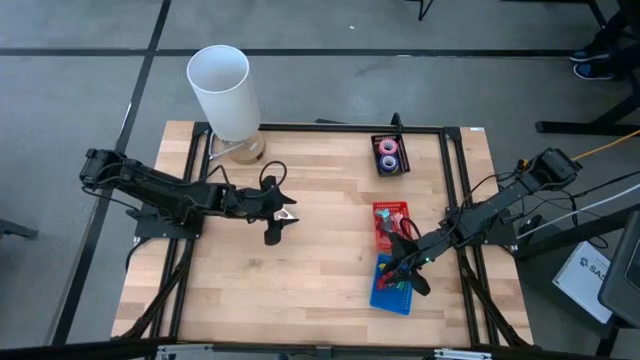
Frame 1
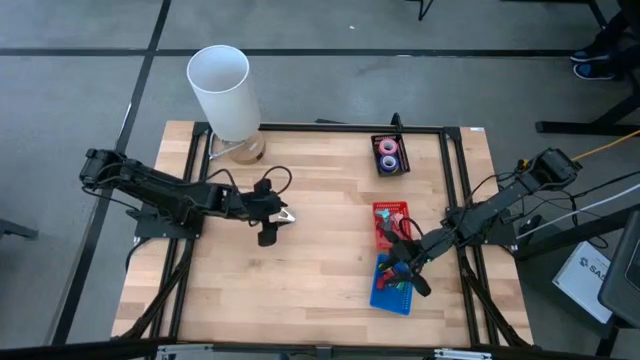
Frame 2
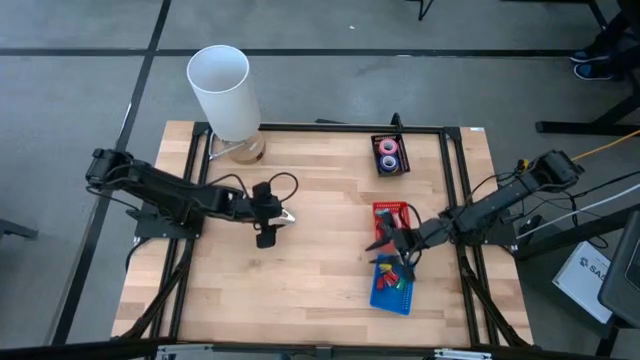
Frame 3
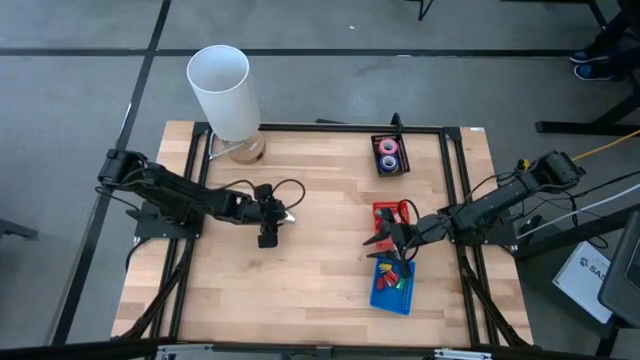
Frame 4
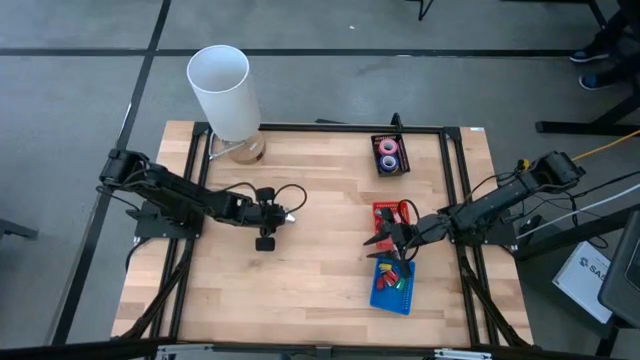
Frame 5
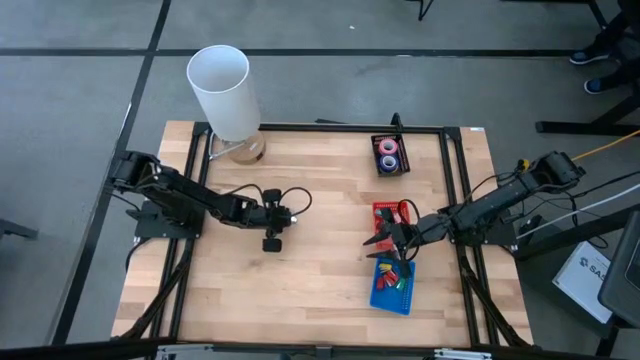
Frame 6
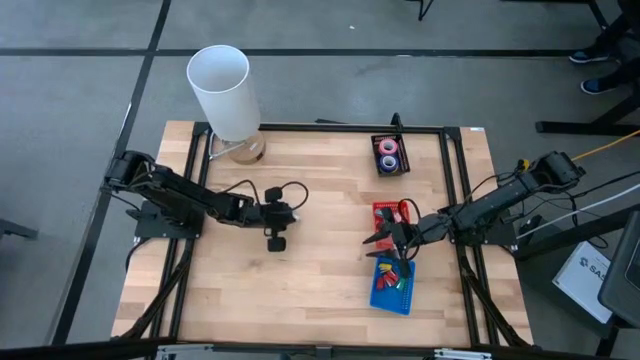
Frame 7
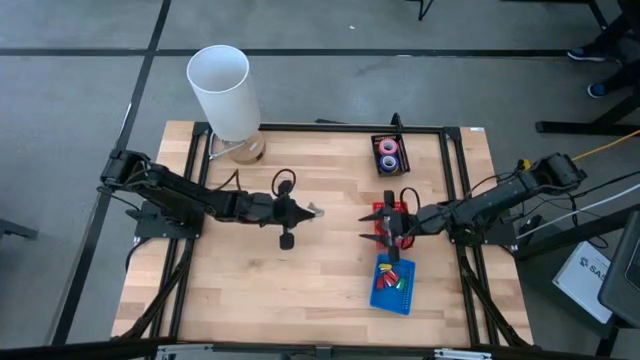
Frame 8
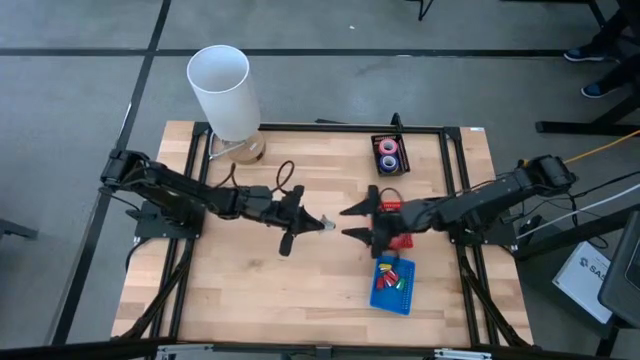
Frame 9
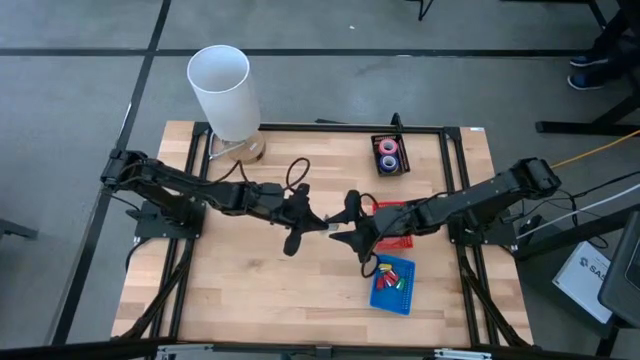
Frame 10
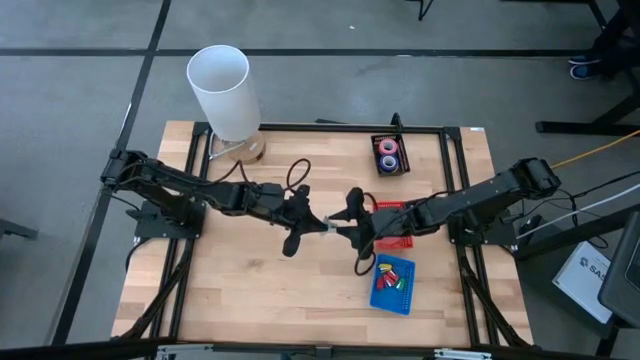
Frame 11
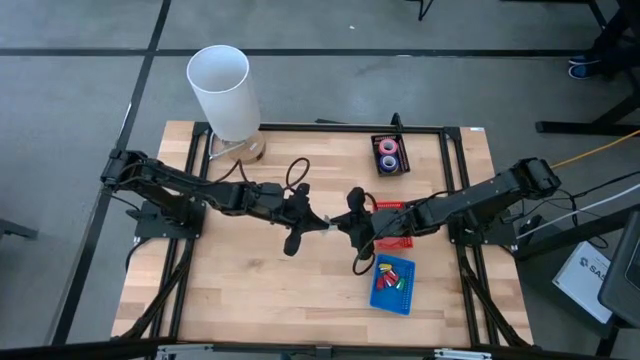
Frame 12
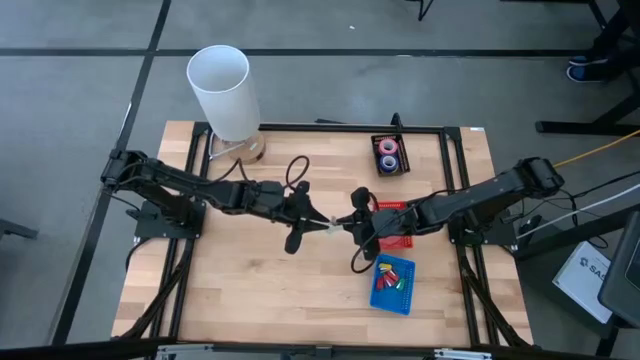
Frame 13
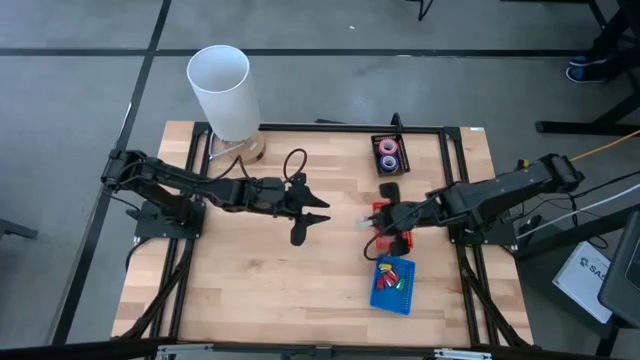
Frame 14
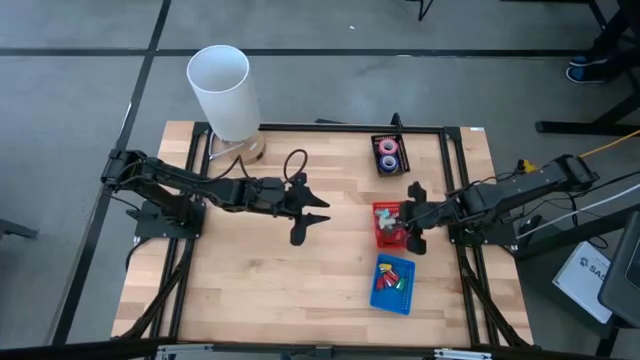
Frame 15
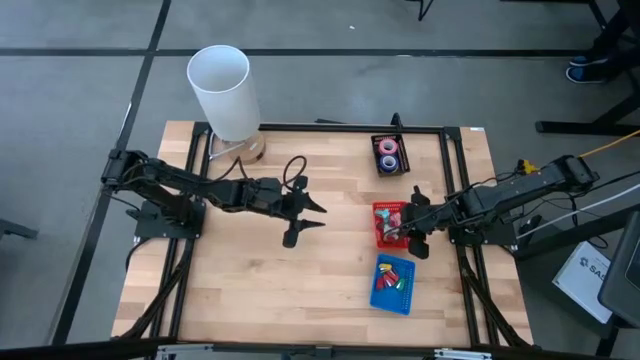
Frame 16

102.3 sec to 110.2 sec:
Task: Pick and place Stapler, Stapler remover, tape
Put the white staple remover into the red basket

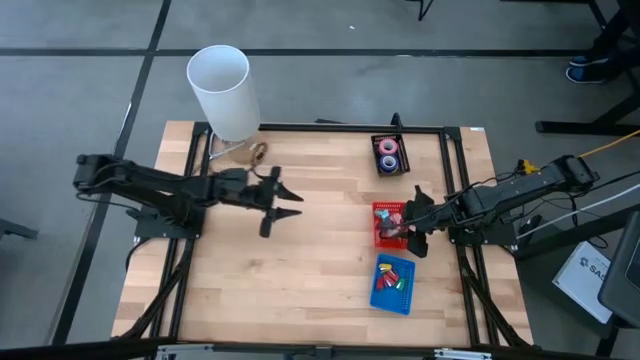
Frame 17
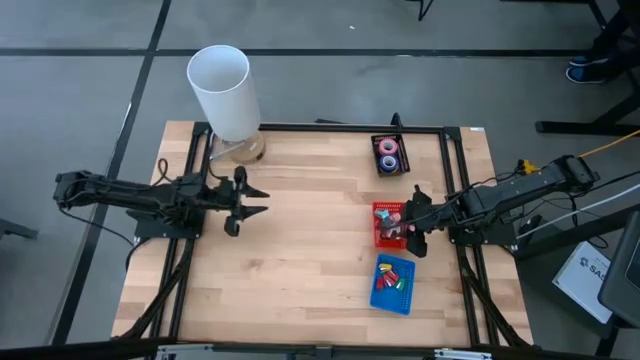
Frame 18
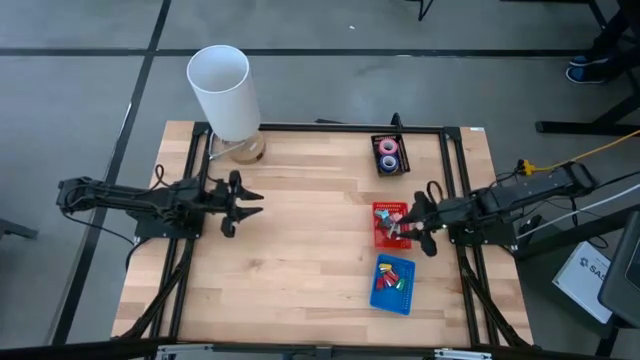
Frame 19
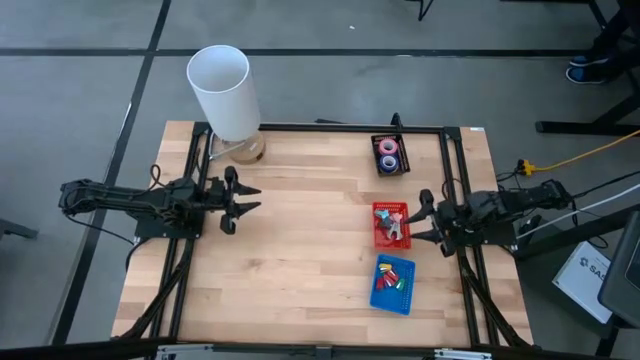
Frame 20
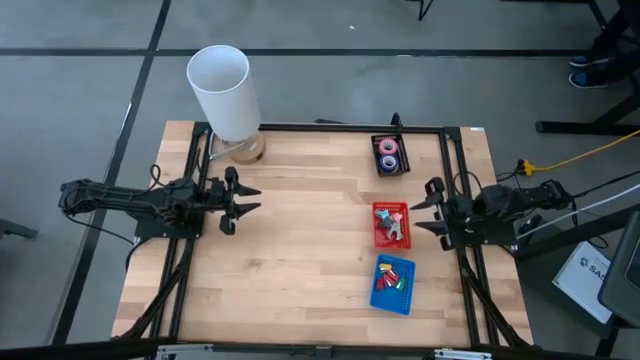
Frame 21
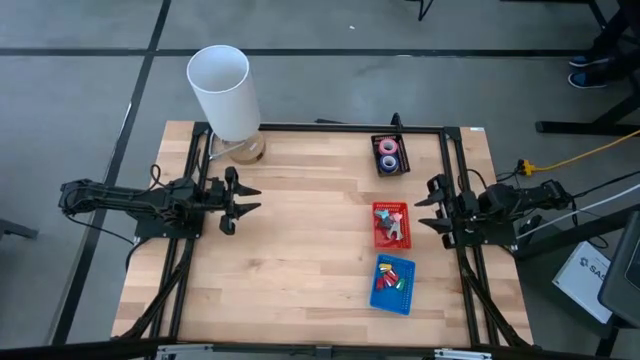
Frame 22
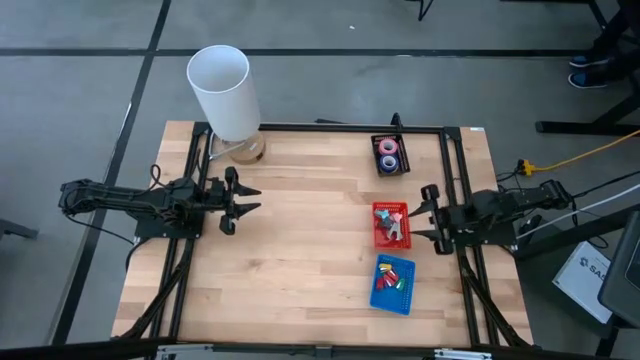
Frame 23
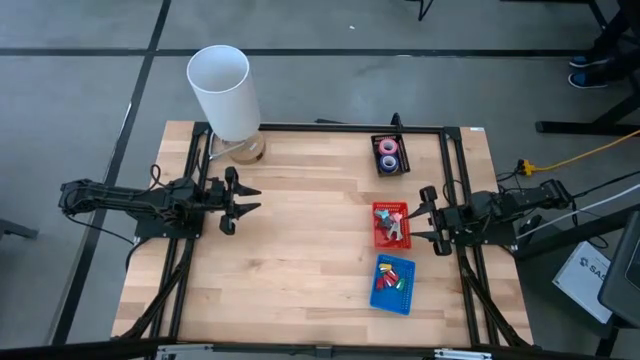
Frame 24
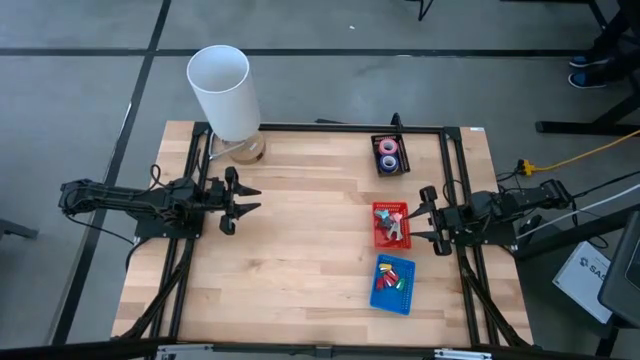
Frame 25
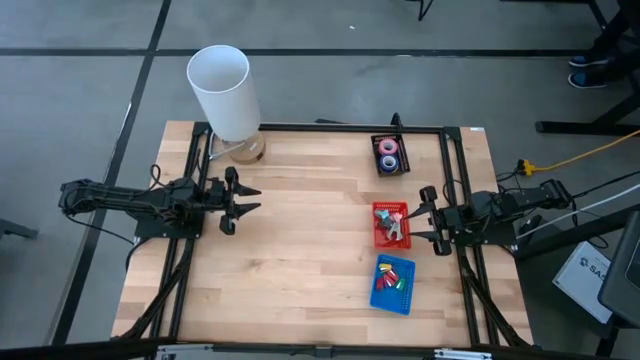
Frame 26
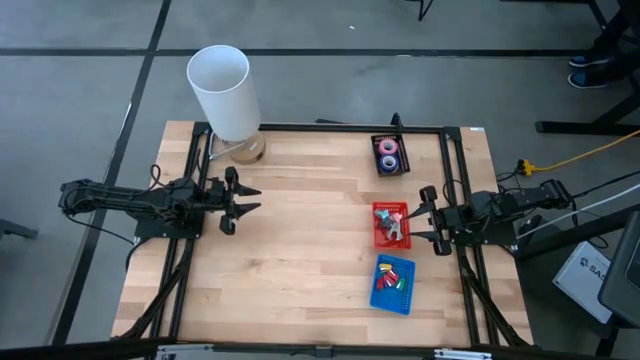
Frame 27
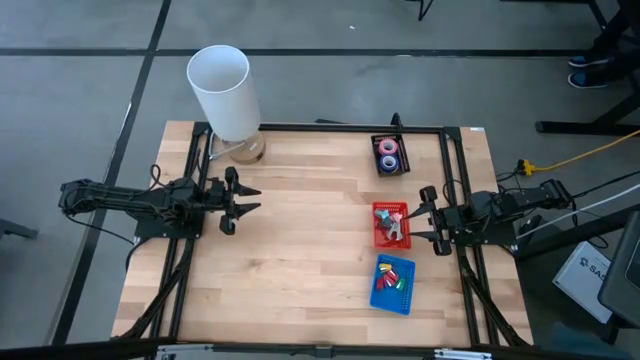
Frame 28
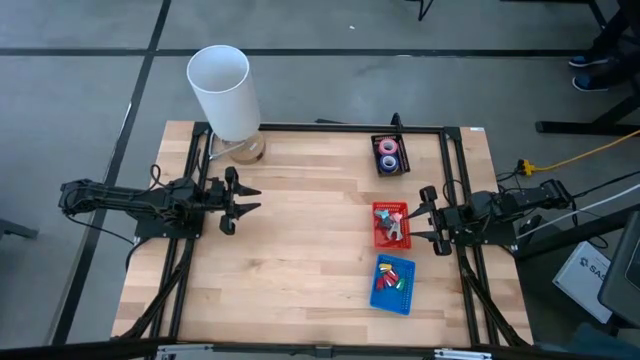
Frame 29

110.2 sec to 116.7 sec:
Return to Home Position

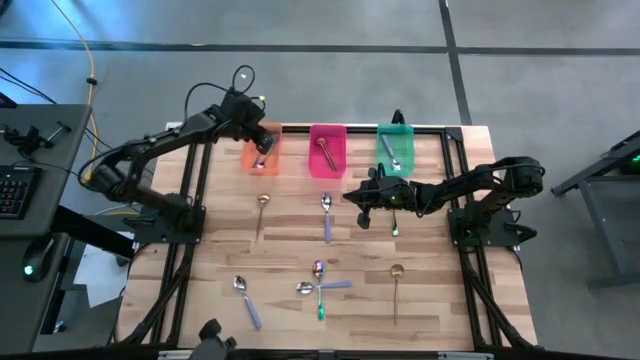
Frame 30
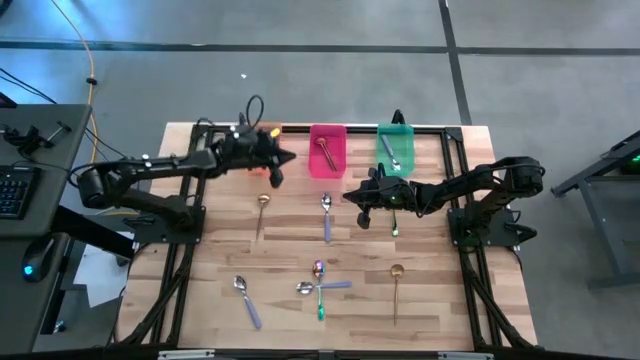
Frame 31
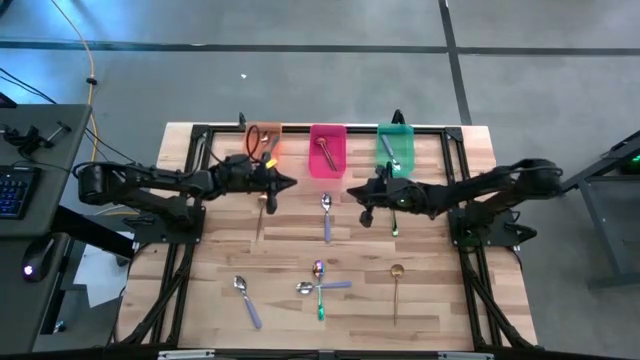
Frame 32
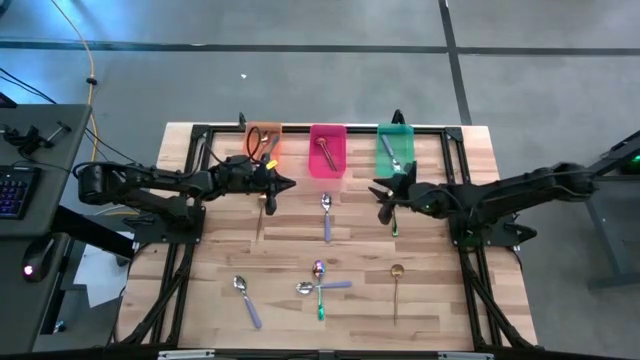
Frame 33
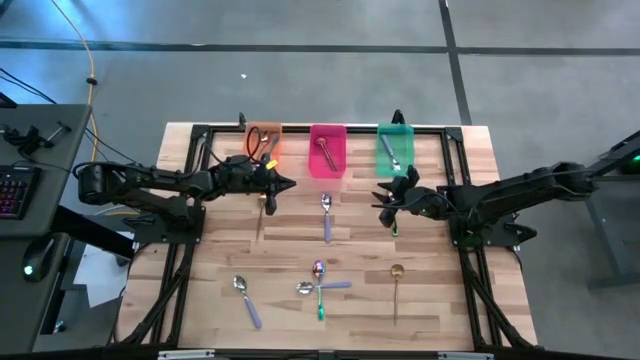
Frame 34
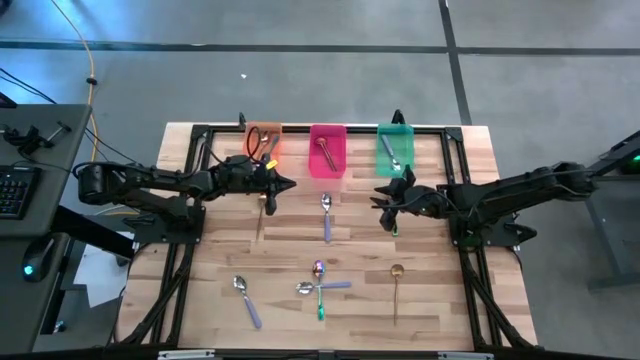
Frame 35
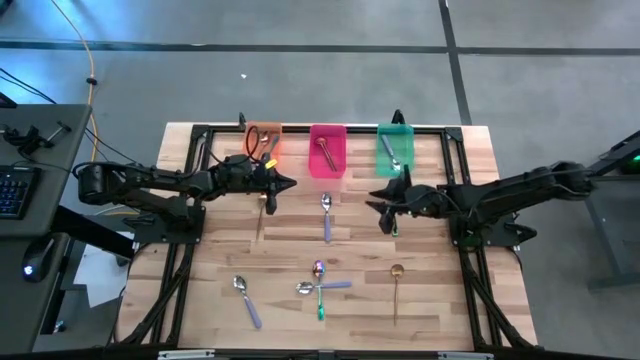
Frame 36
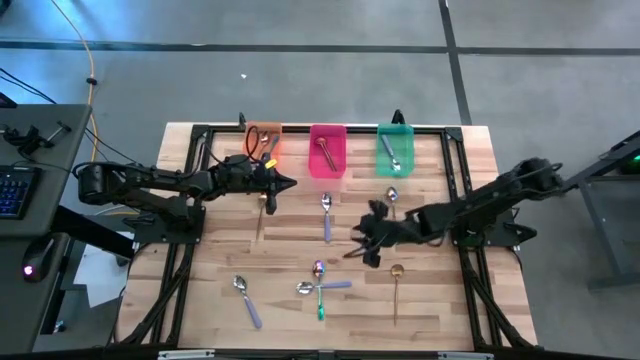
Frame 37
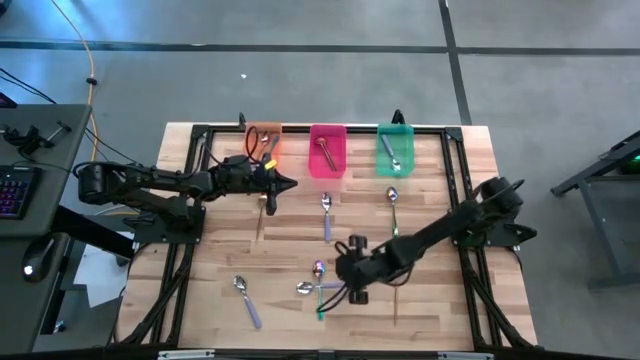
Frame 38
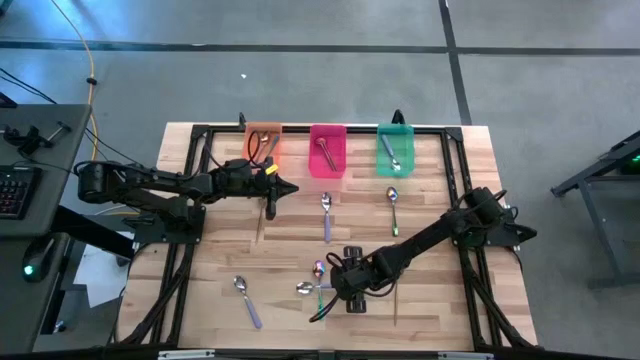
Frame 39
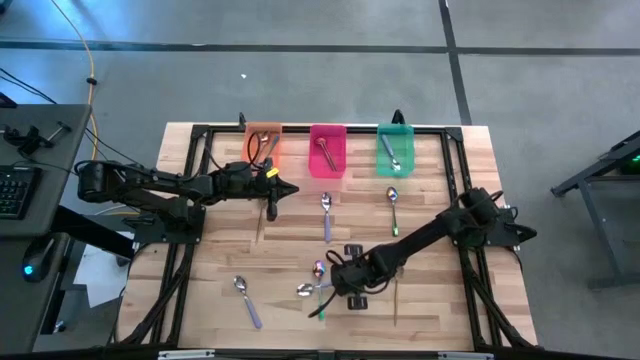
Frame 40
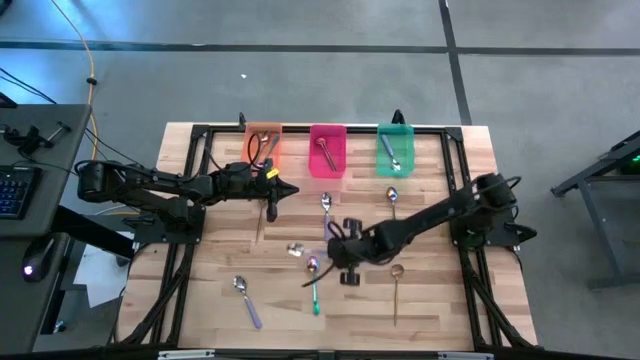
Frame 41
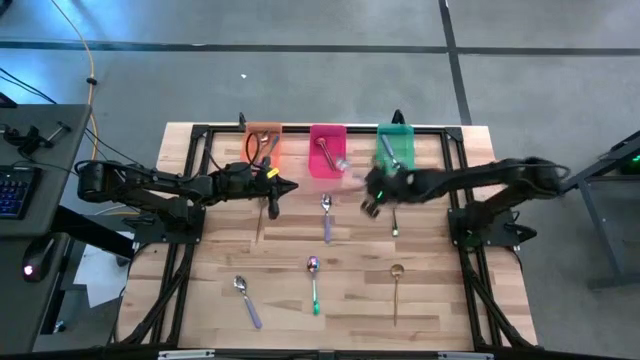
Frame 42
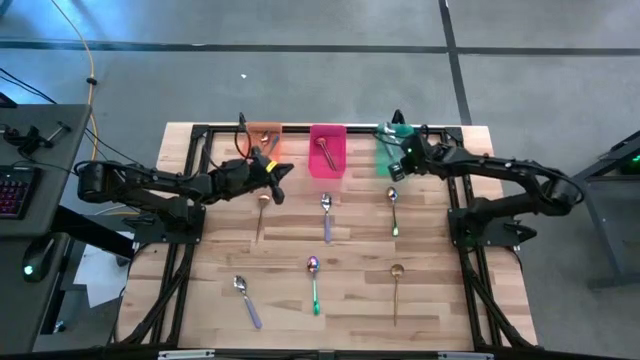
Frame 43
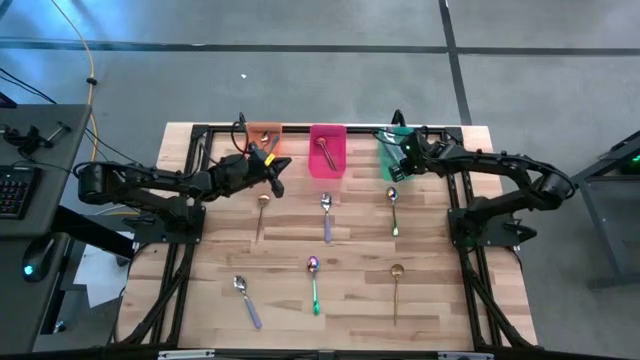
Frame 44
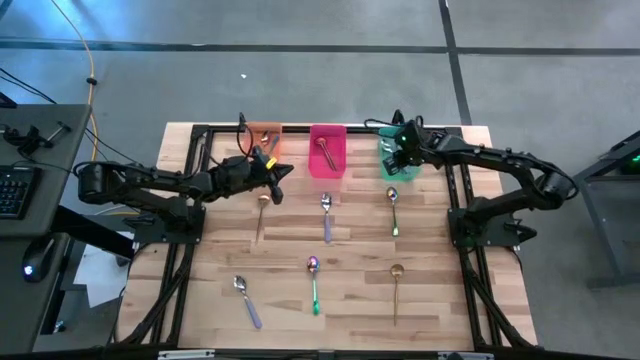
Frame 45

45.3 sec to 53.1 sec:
Task: Sort silverware by color (type)
Put the middle bottom purple spoon into the green bin
